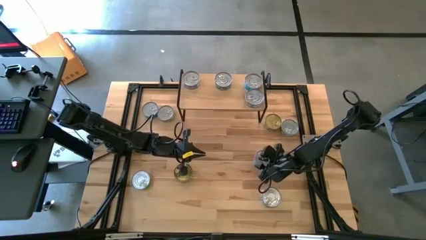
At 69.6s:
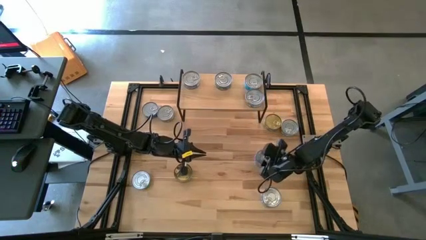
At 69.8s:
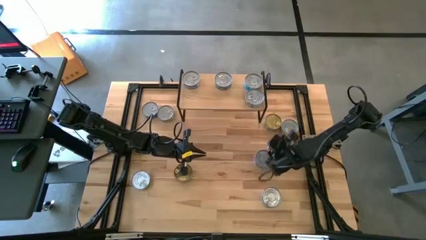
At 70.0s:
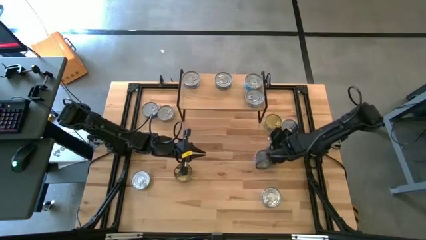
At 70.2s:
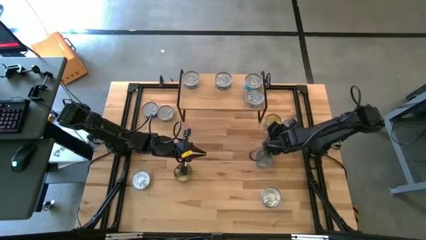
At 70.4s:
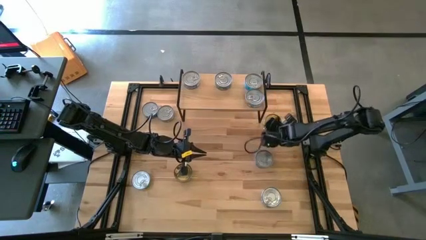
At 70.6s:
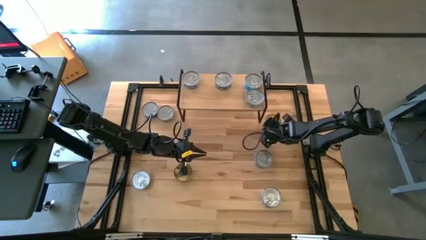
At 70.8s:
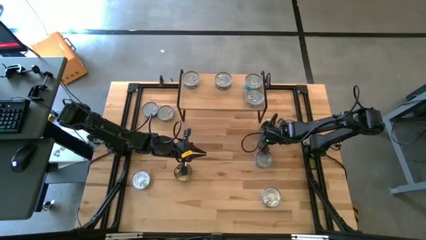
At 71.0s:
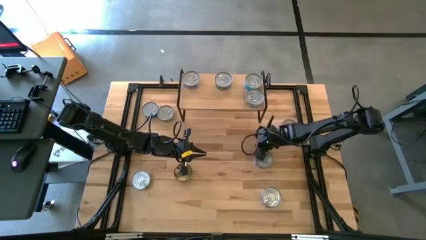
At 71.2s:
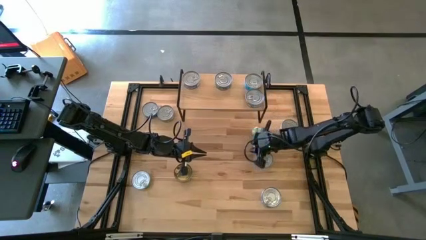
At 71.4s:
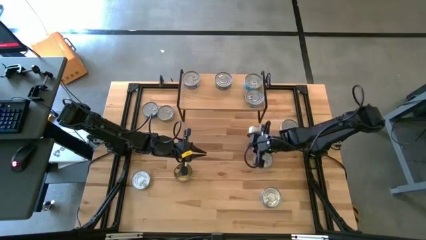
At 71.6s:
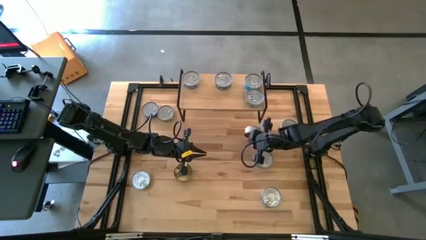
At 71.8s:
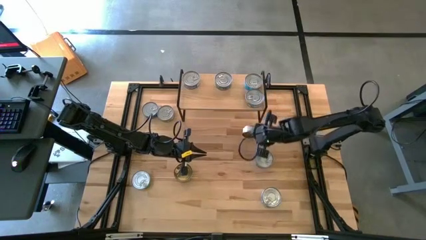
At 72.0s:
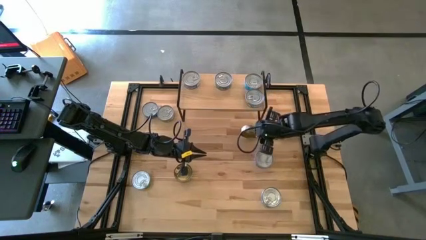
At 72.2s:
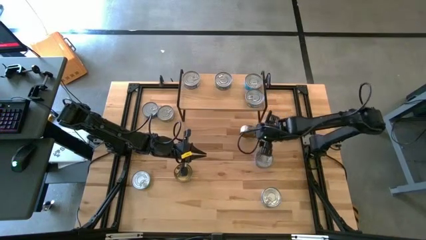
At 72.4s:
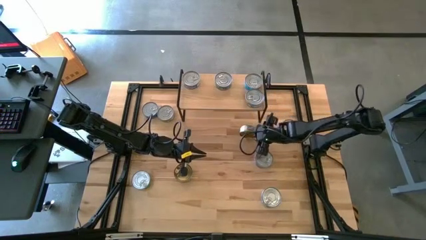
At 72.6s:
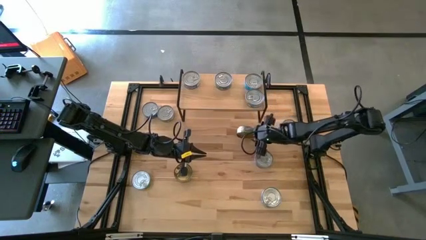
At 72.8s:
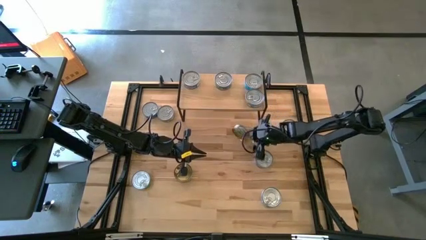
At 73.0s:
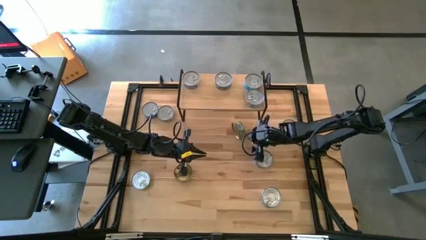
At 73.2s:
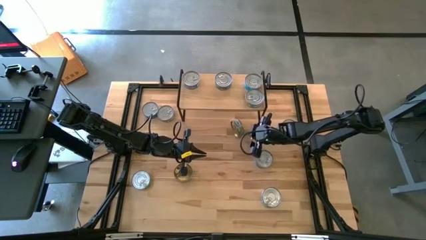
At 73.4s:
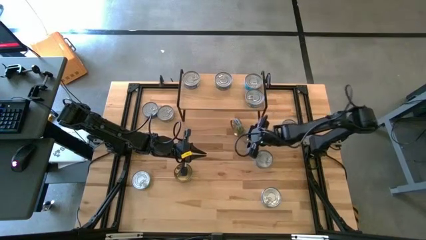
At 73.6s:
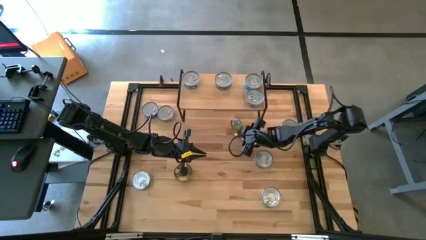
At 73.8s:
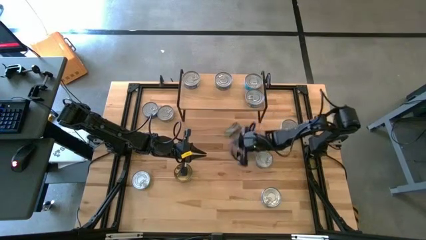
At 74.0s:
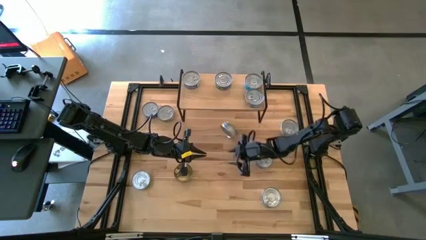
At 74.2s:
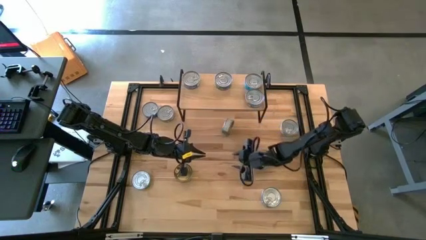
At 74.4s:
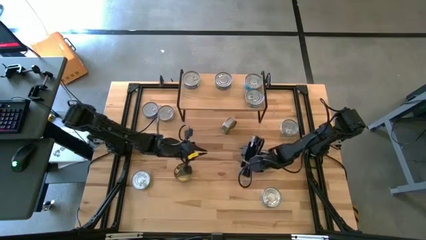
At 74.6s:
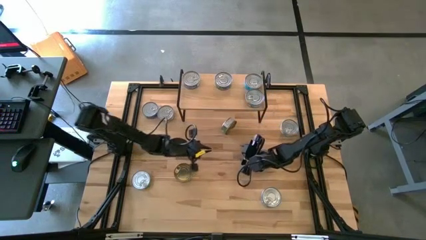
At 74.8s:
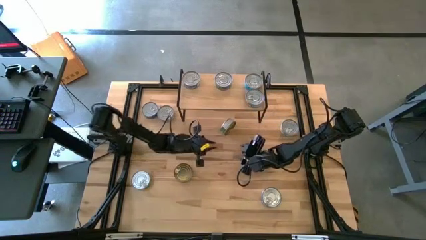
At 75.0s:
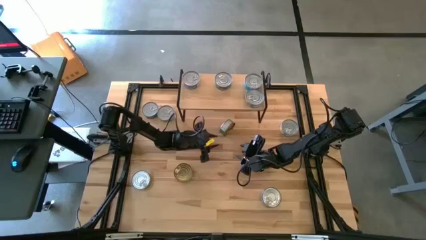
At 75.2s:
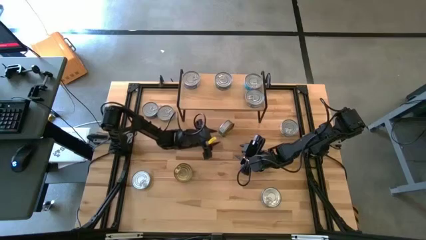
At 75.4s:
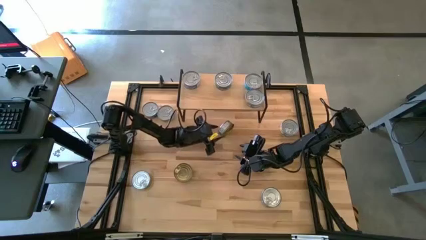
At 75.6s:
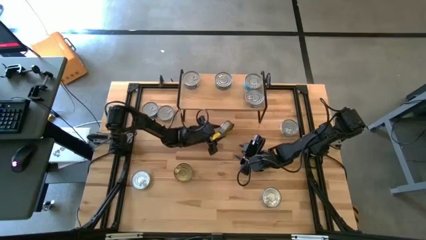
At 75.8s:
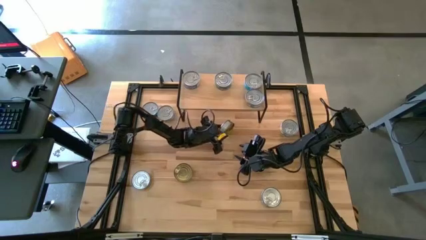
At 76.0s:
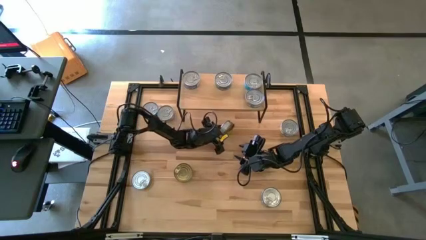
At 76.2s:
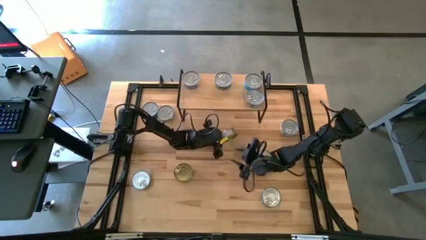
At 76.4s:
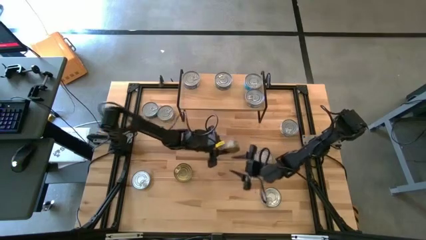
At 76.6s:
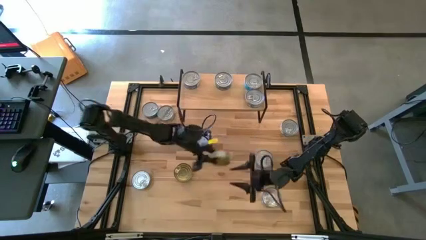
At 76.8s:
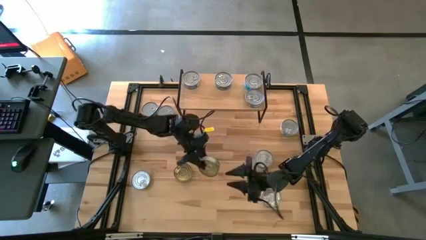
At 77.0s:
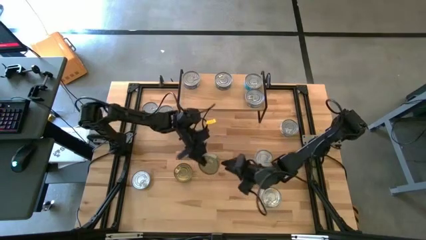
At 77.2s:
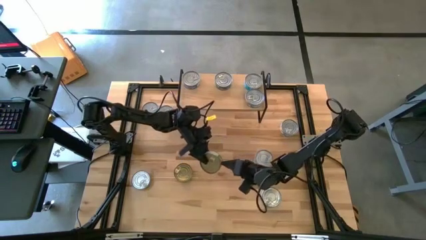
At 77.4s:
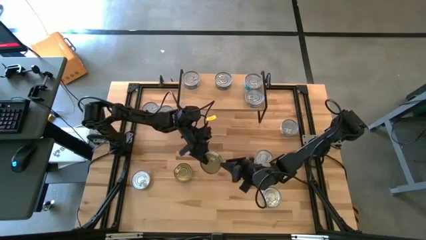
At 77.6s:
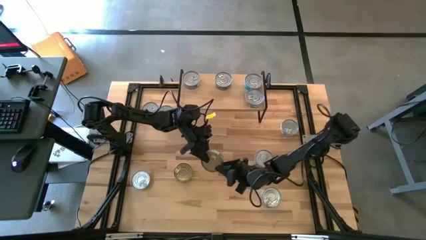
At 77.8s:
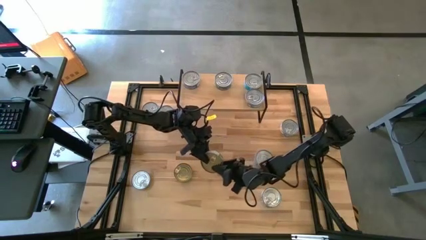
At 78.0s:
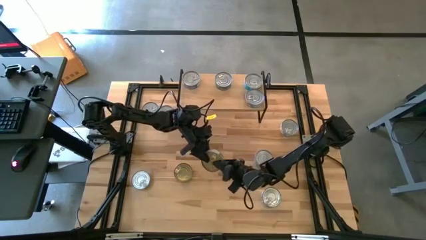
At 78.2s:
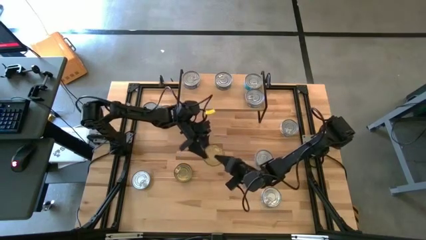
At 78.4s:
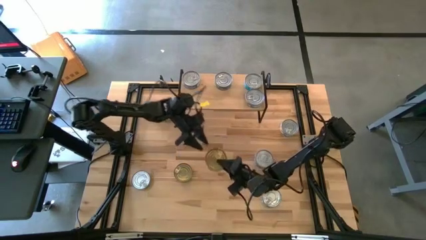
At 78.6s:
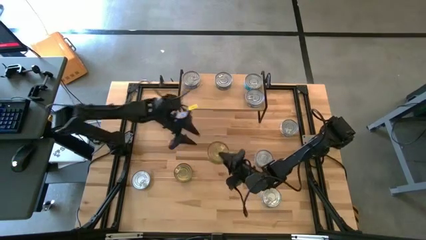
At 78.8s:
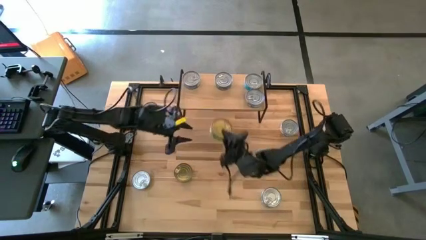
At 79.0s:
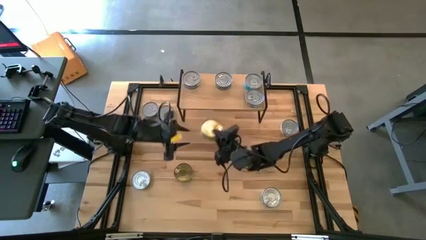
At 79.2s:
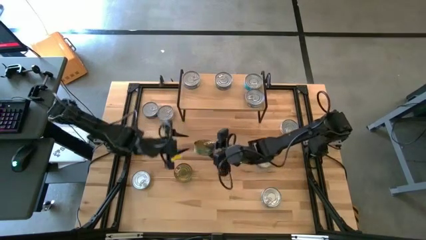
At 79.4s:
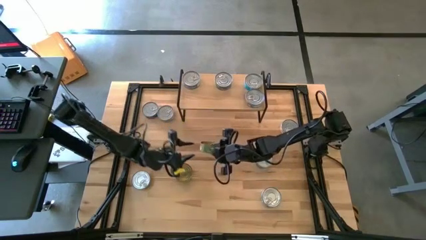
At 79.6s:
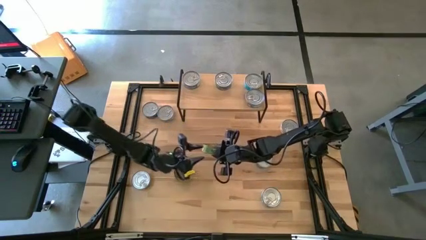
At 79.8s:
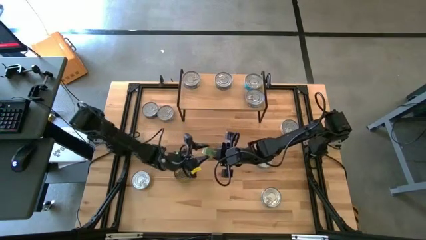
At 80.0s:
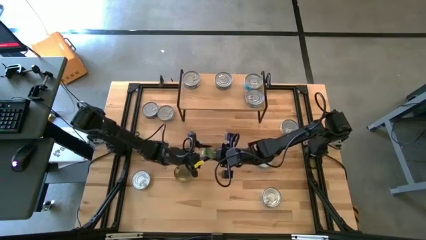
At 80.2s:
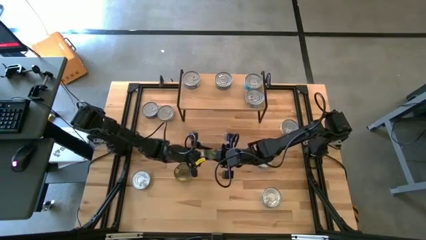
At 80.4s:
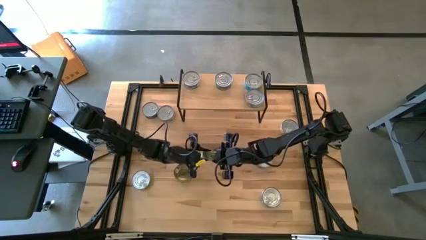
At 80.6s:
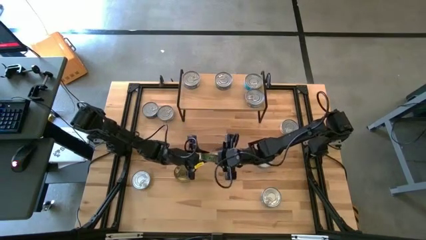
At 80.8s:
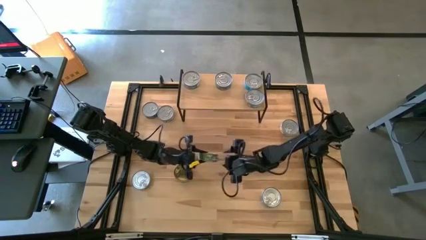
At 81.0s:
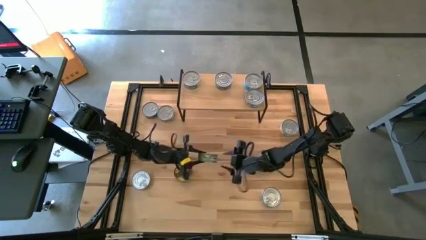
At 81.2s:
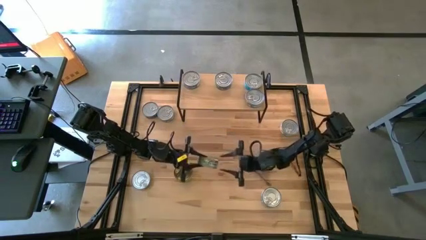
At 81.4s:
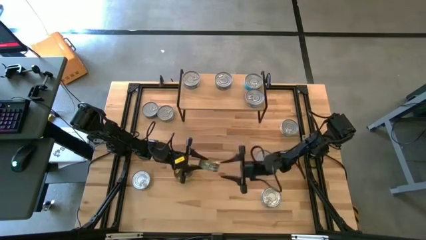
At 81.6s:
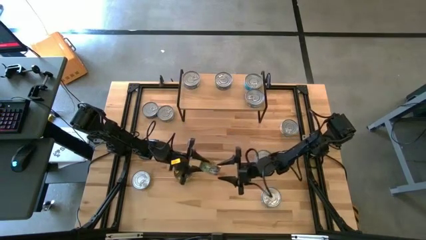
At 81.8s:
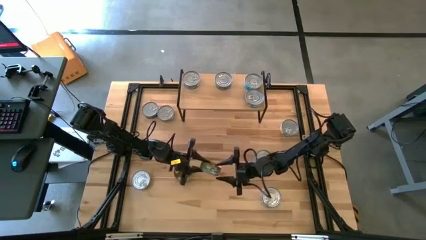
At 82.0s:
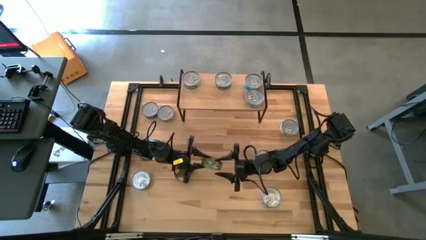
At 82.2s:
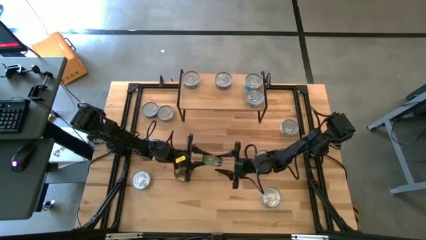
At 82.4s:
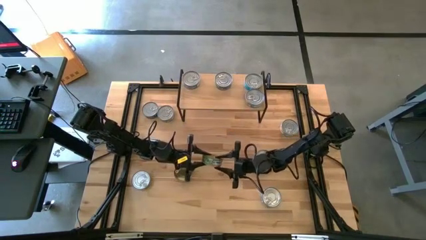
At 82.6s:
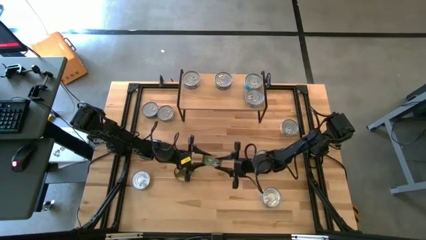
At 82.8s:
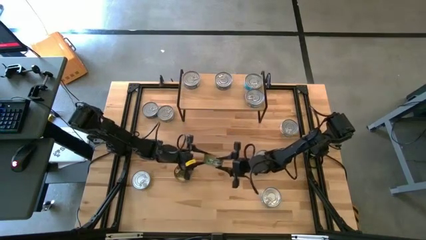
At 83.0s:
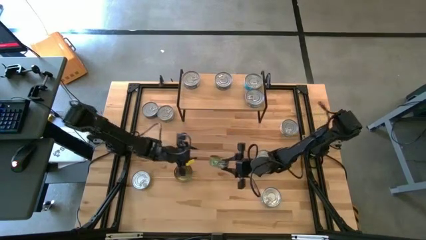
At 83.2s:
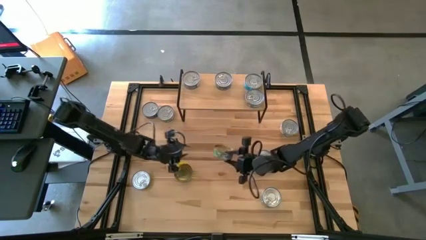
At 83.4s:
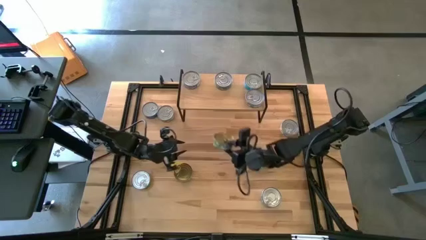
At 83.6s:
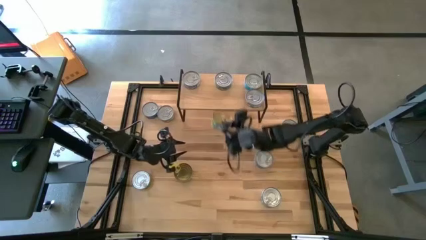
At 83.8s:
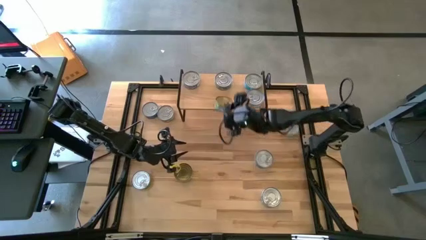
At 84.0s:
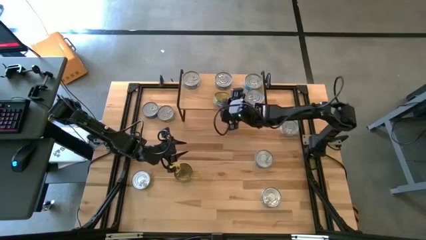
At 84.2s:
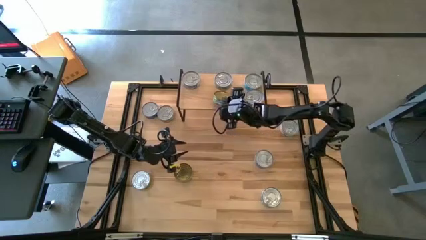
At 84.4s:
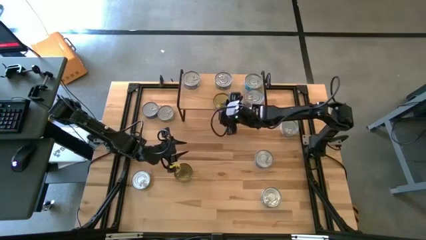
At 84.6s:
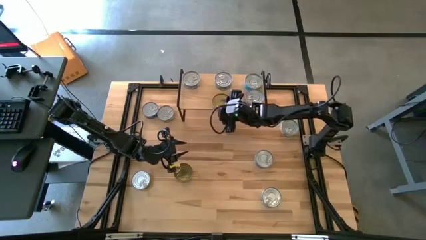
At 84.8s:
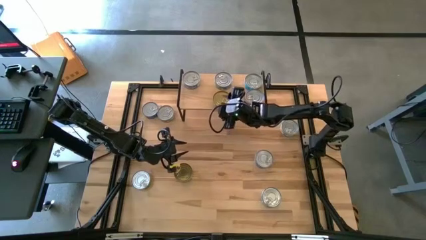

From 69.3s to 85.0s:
Task: Stack canned seafood by type on shelf
Put the green tuna can on the shelf aligned with the other green tuna can

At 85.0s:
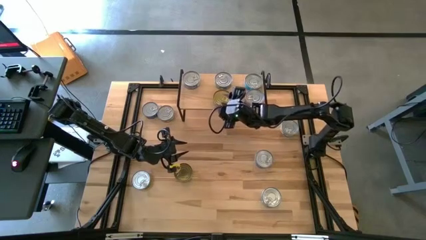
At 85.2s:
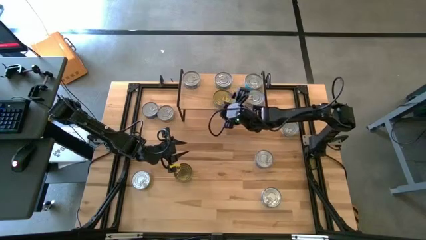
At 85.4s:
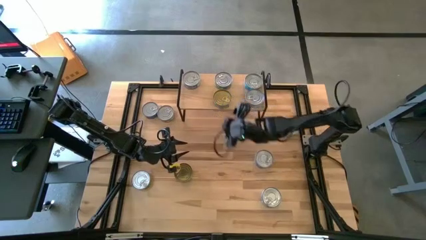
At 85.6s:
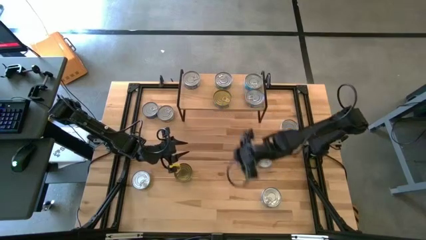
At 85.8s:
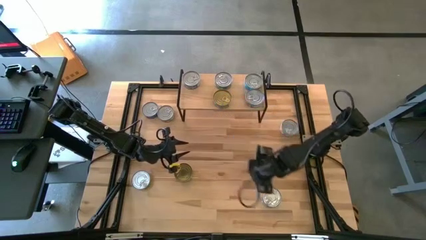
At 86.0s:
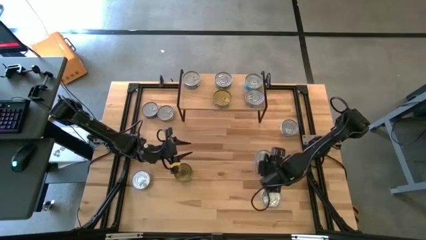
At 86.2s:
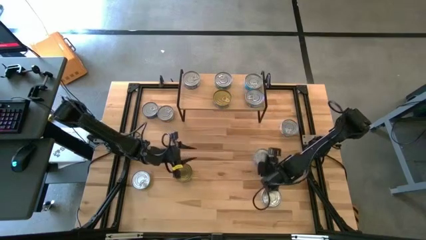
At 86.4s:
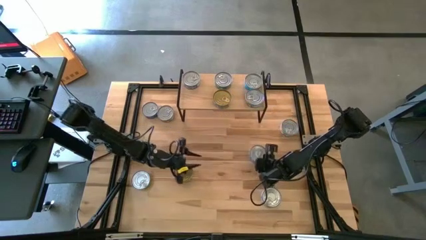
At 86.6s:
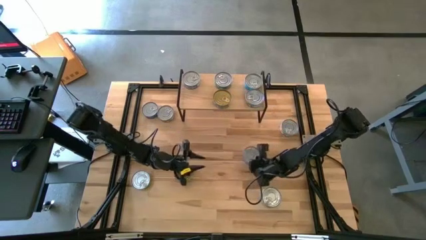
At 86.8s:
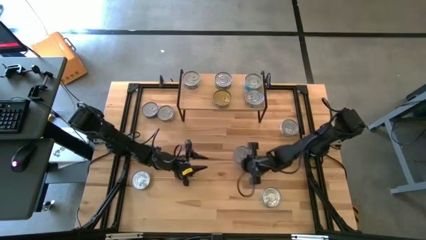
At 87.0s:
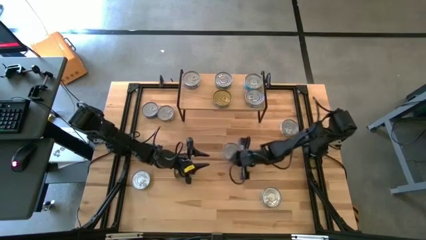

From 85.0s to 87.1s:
Put the blue tuna can on the shelf aligned with the other blue tuna can
